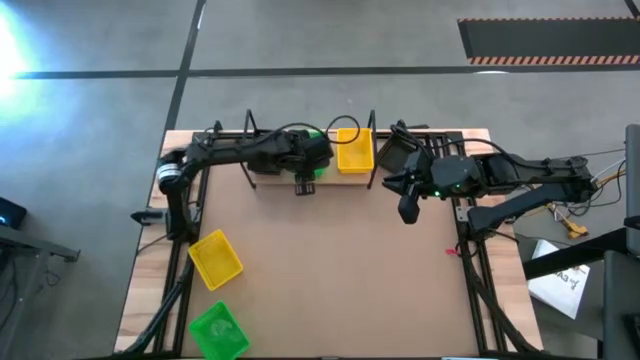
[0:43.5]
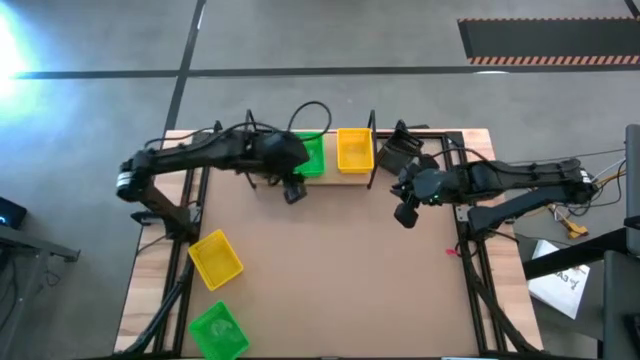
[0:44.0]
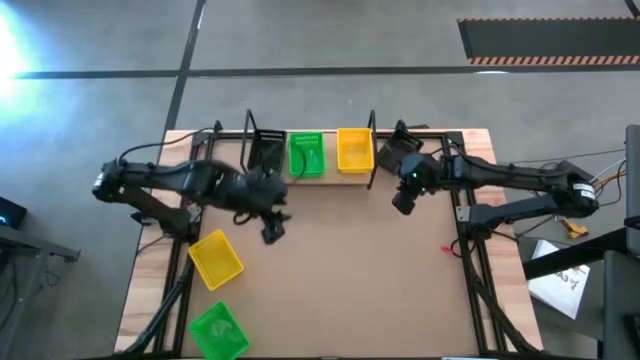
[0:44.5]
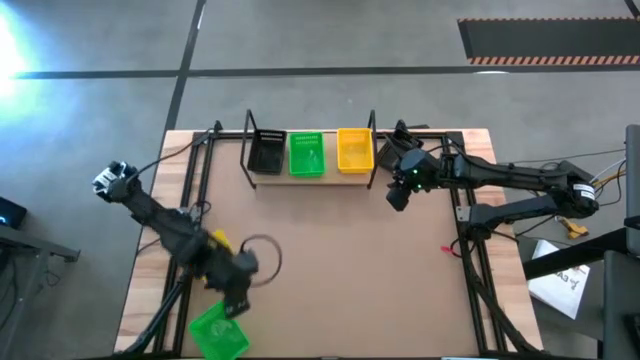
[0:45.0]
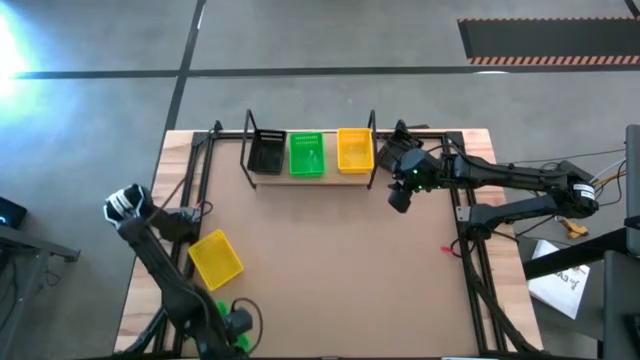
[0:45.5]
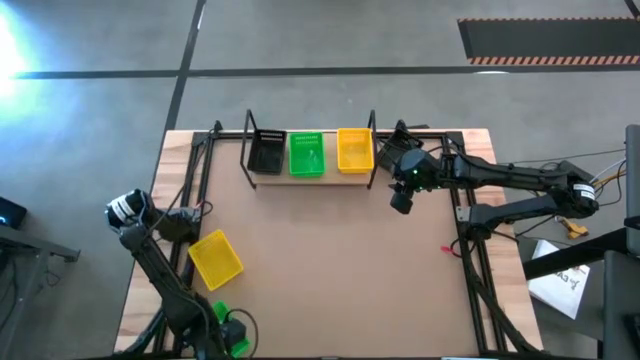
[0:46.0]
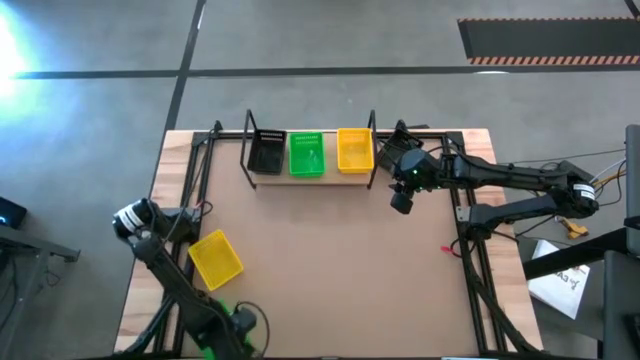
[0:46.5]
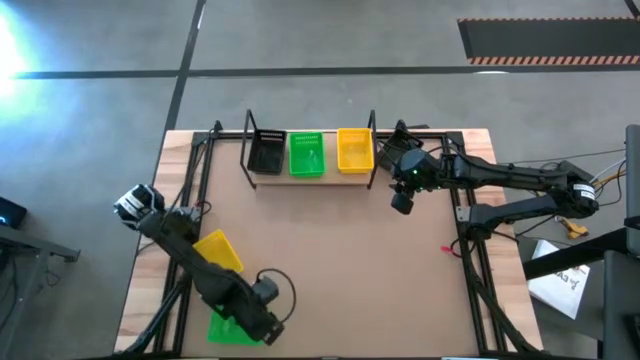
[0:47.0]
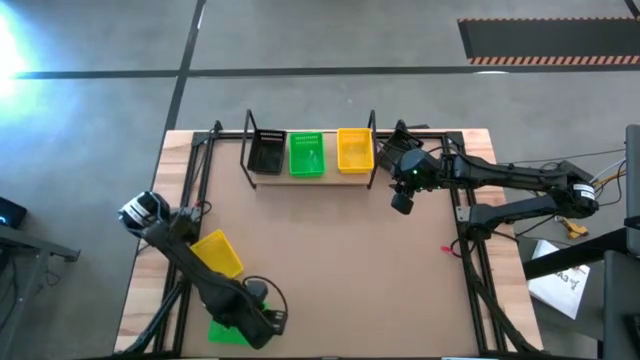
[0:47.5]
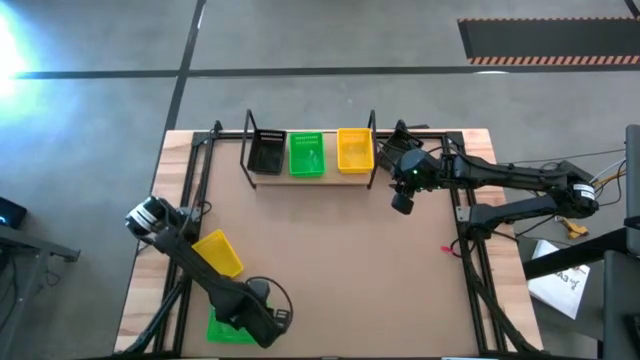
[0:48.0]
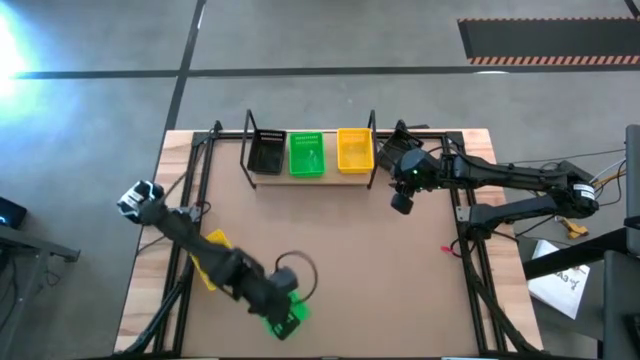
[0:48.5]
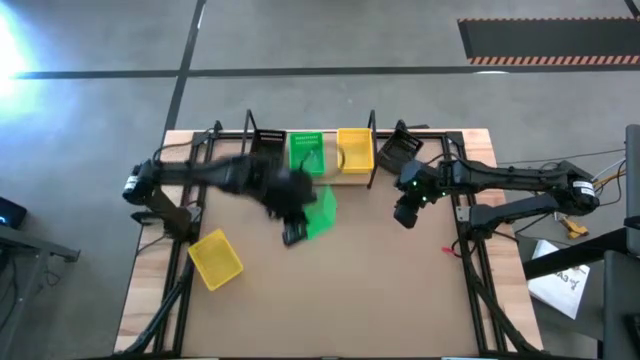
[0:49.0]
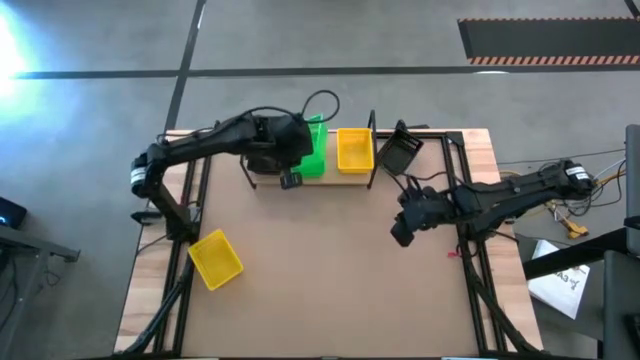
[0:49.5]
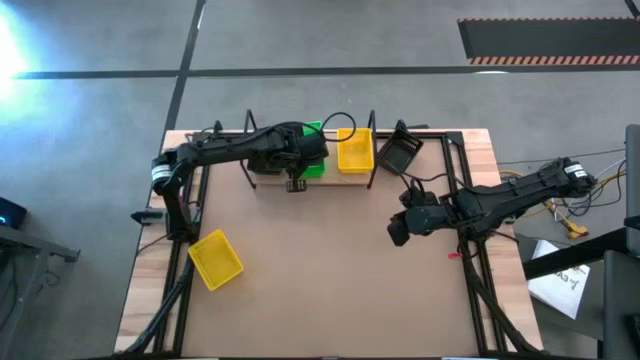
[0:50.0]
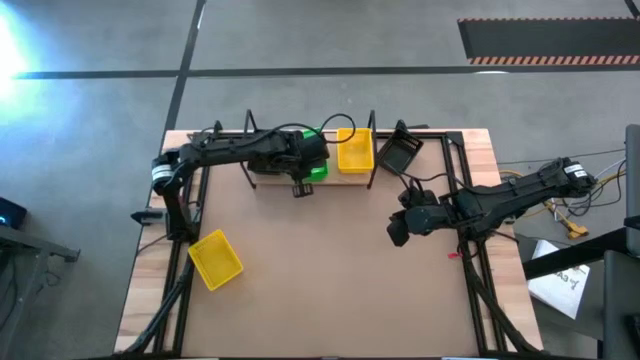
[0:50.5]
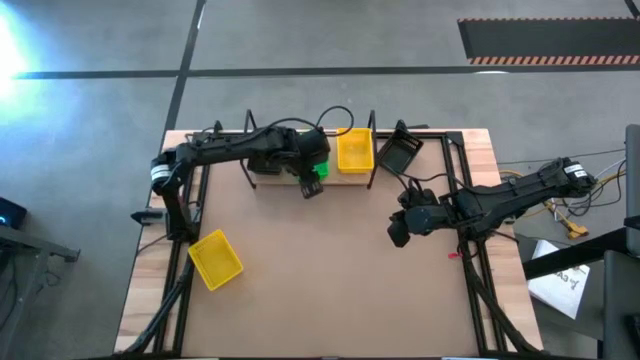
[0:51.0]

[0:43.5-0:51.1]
Task: Stack baskets on shelf by color
Stack the green basket on the green basket on the shelf

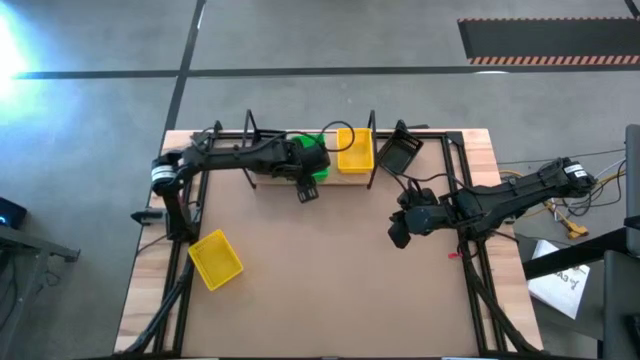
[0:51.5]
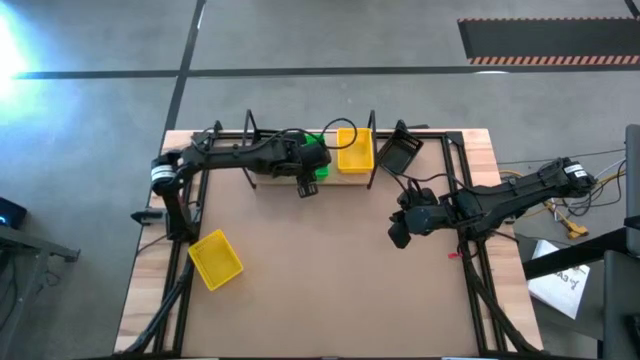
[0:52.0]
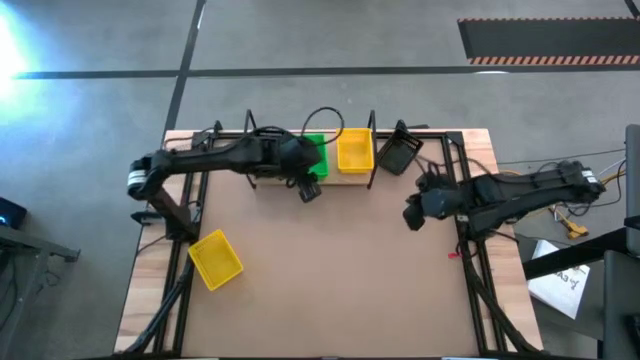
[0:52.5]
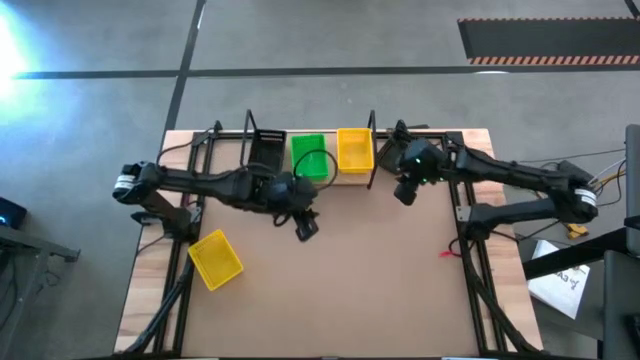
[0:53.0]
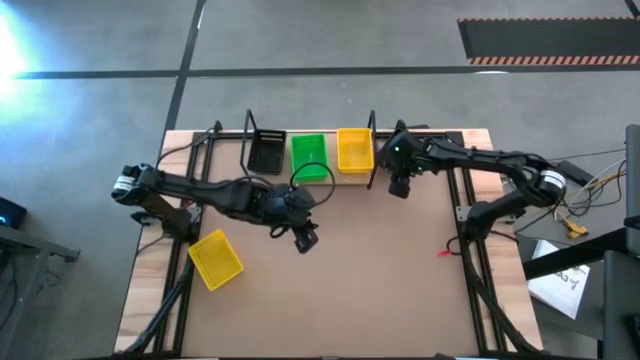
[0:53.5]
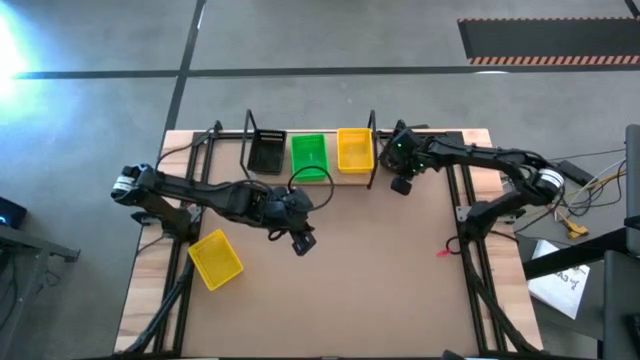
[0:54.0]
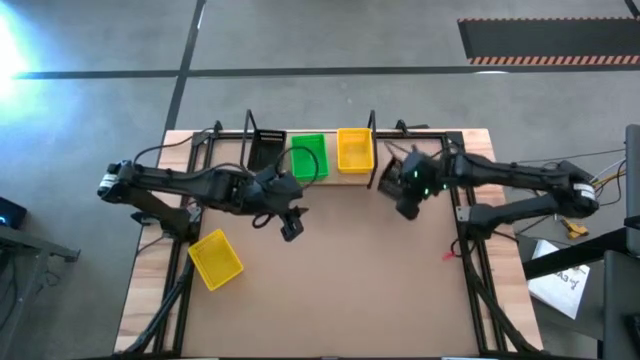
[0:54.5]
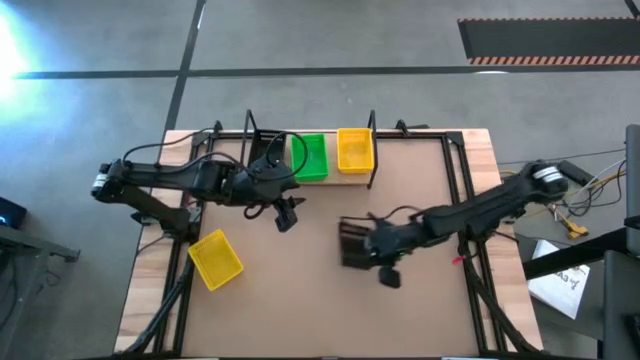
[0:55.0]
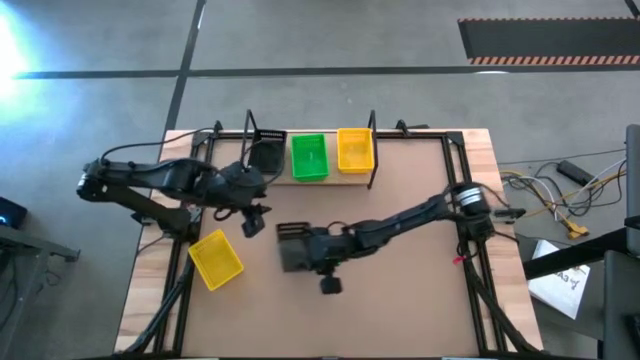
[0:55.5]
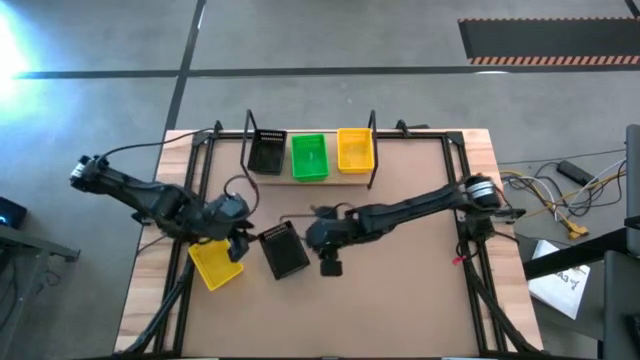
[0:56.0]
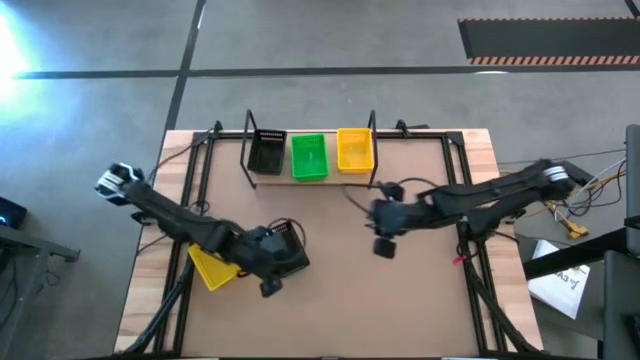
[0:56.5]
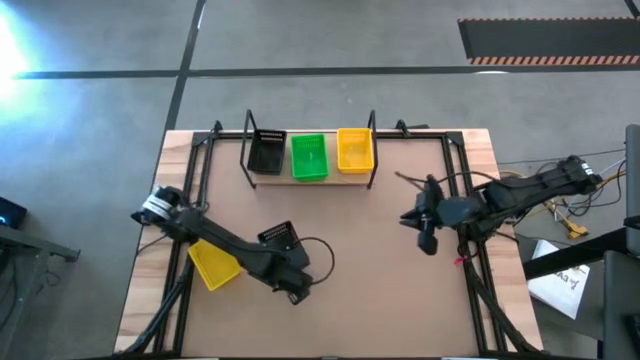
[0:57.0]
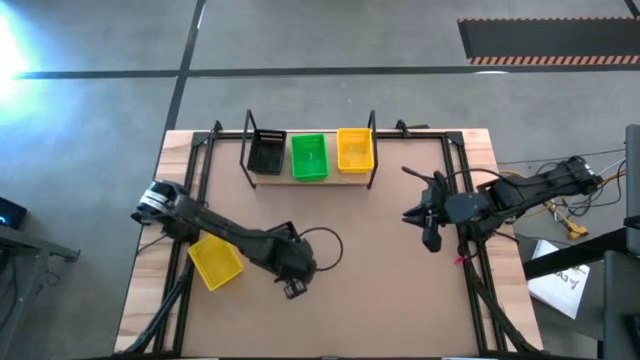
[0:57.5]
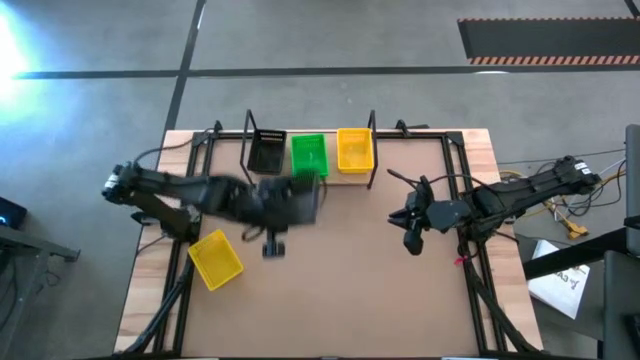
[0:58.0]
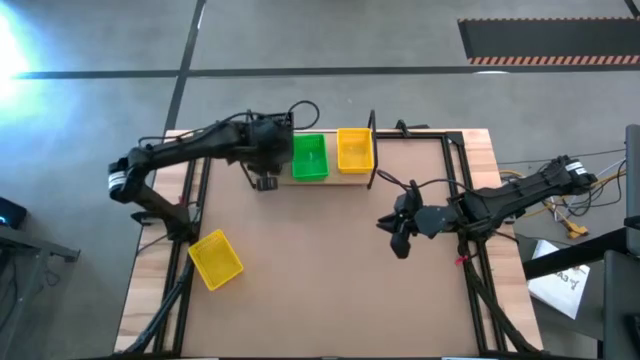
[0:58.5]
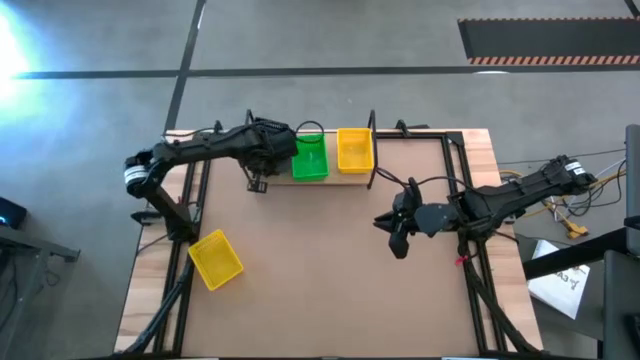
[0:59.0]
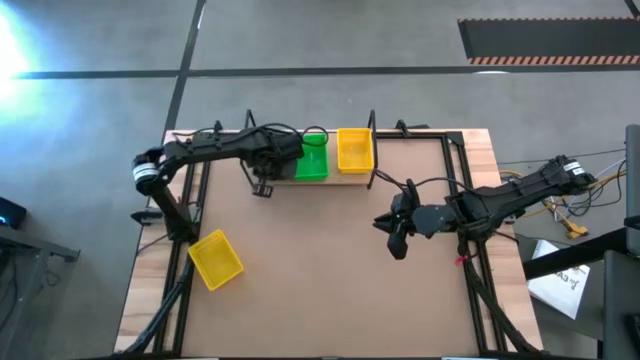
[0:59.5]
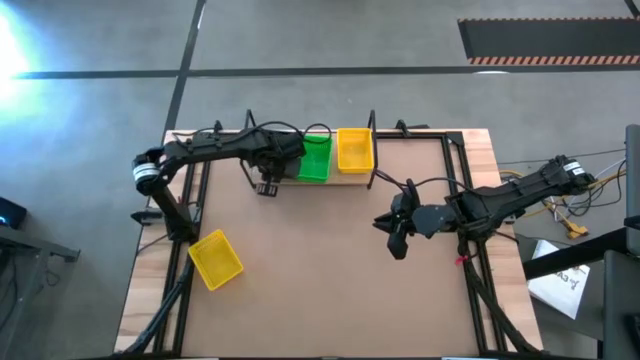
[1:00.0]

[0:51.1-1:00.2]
Stack the black basket on the black basket on the shelf

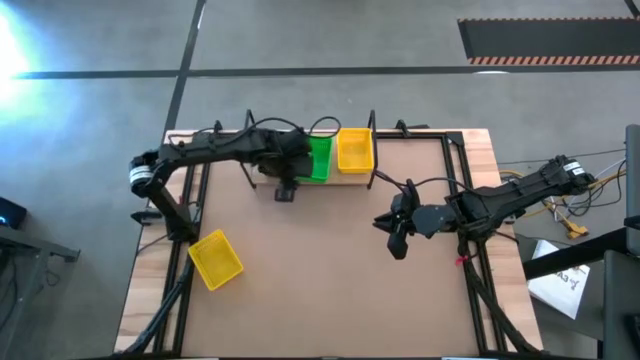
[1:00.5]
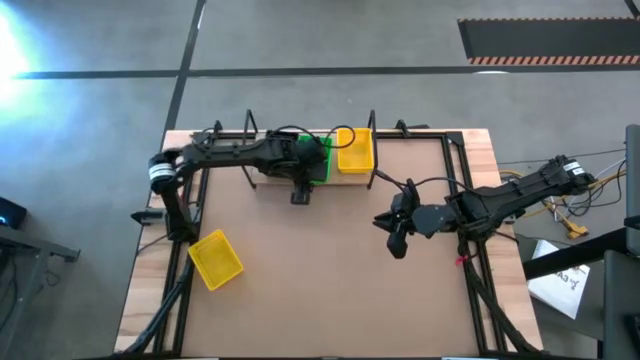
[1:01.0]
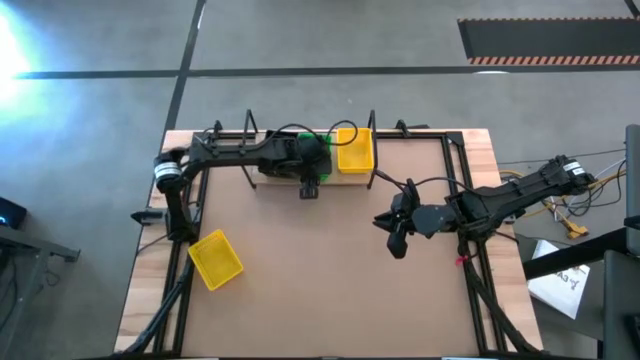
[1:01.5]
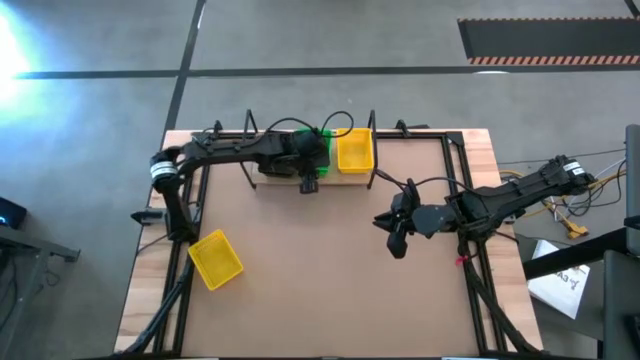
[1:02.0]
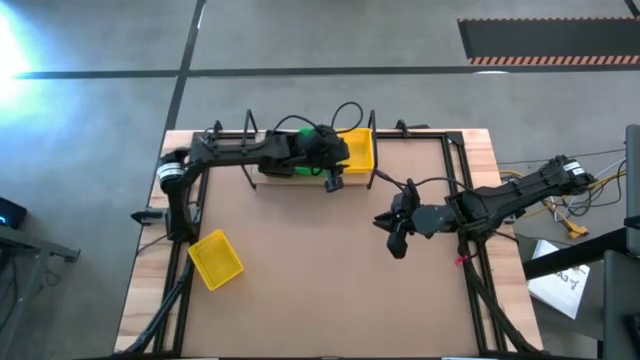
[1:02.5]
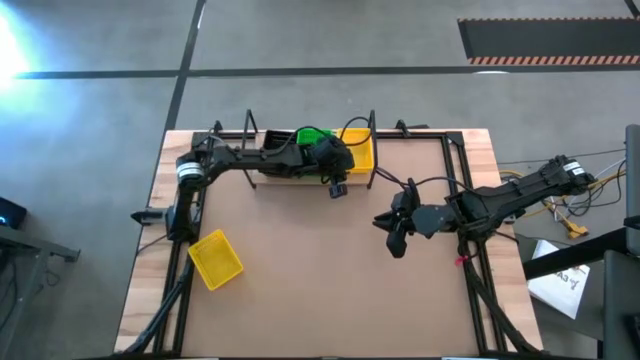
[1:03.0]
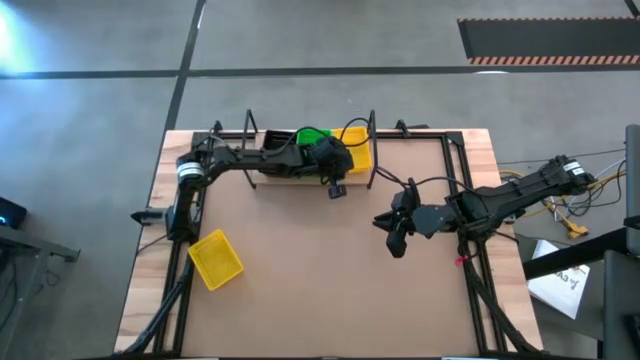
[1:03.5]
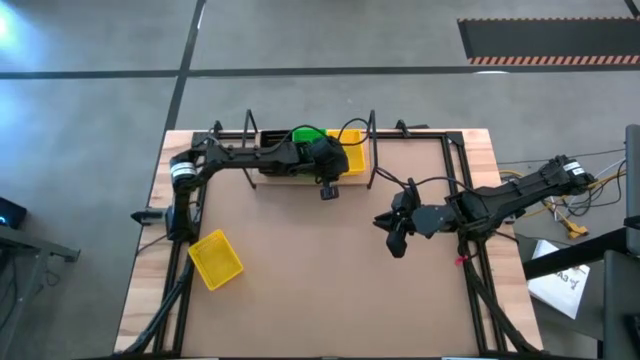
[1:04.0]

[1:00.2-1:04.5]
Adjust the green and yellow baskets on the shelf

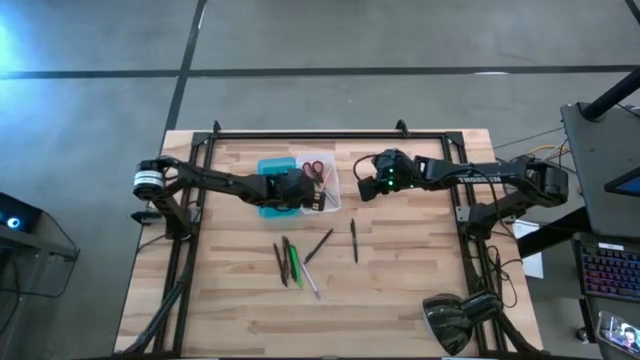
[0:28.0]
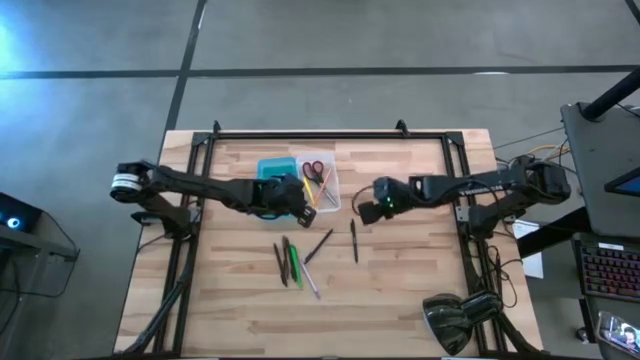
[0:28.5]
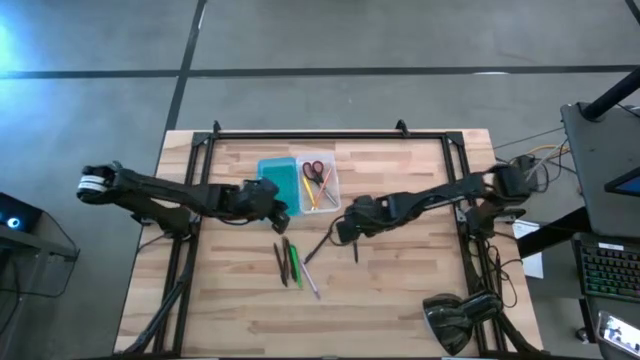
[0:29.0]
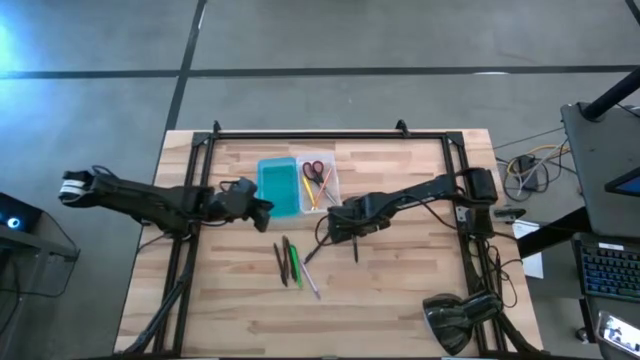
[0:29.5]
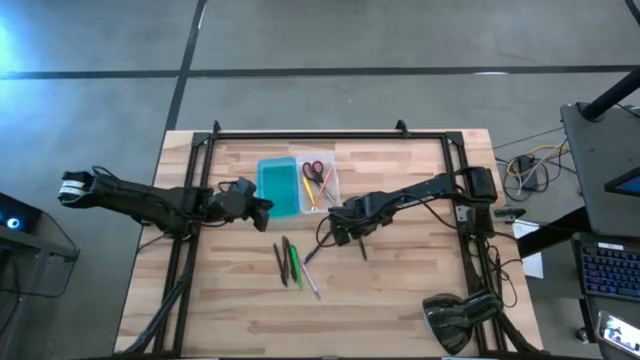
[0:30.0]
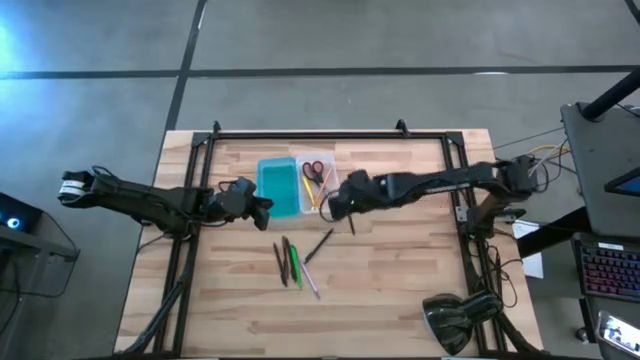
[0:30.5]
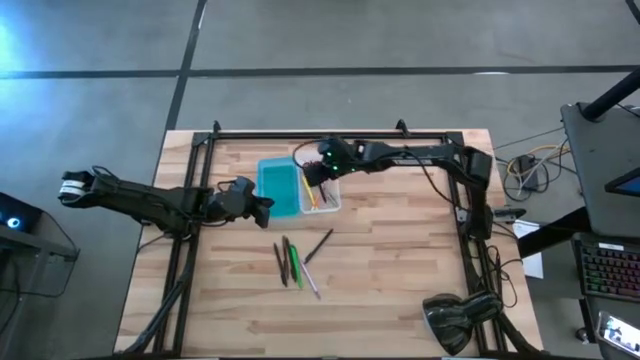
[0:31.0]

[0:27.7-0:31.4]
Task: Pick & place school supplies into a supply box
Put the black pen into the pencil box
